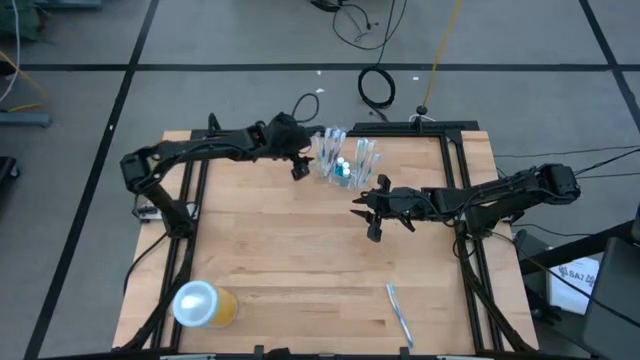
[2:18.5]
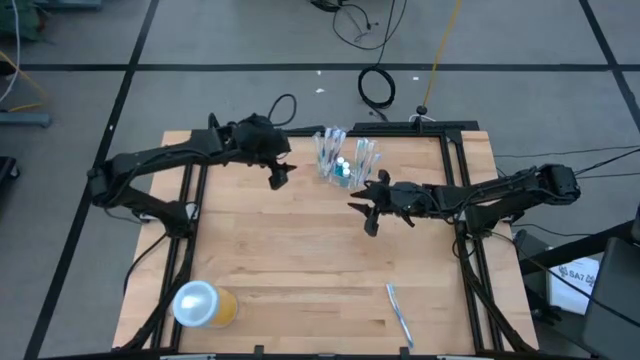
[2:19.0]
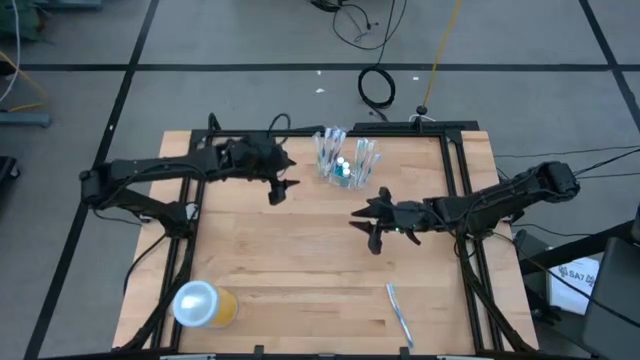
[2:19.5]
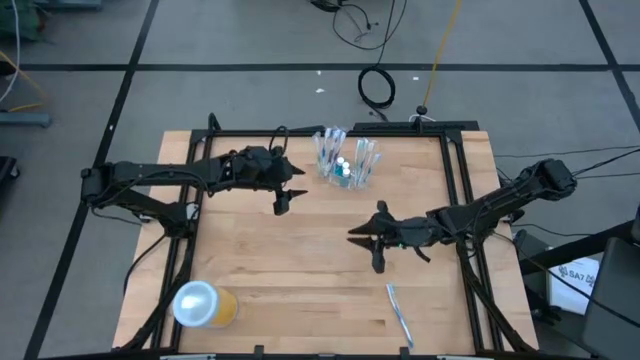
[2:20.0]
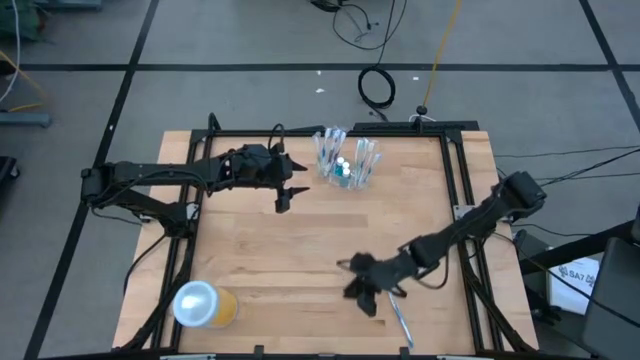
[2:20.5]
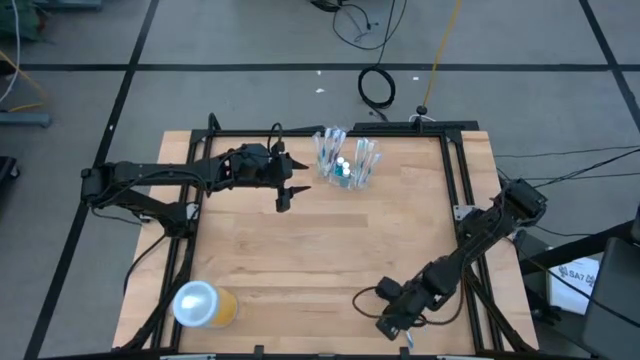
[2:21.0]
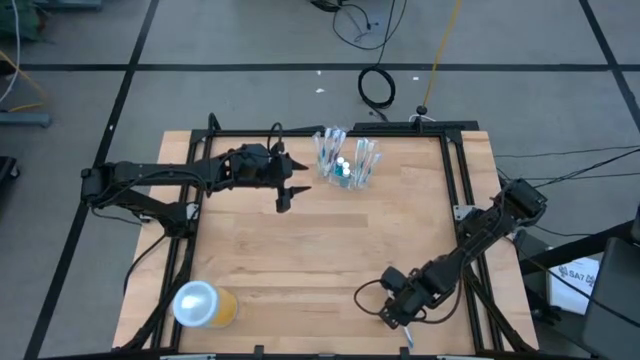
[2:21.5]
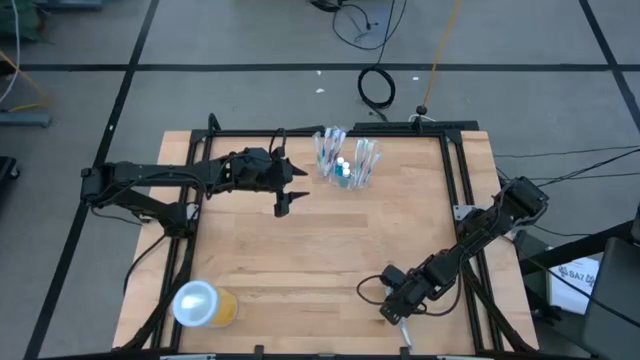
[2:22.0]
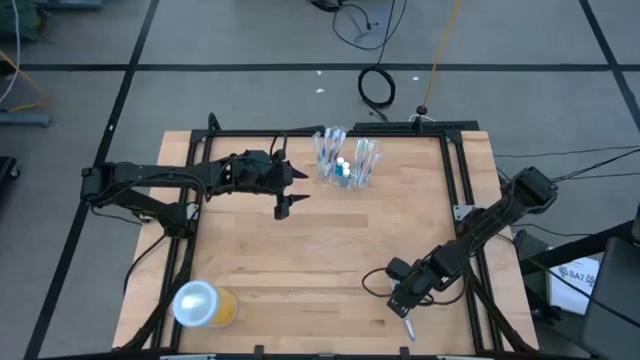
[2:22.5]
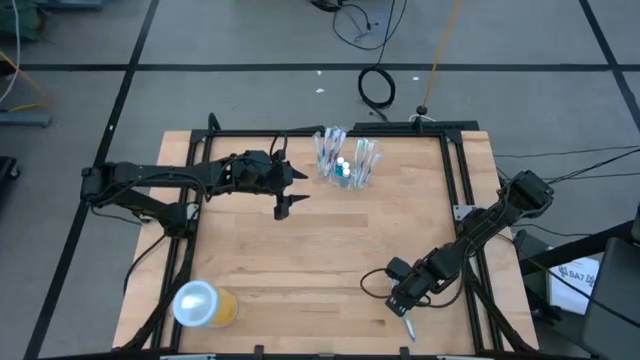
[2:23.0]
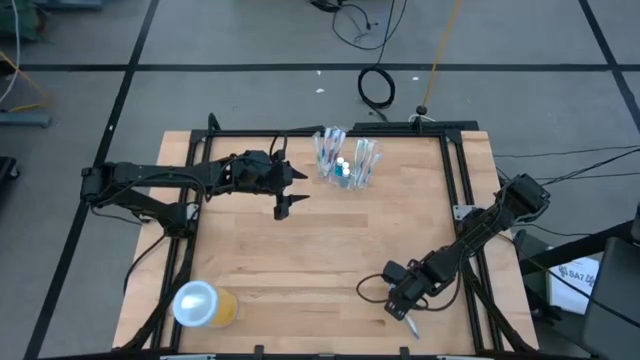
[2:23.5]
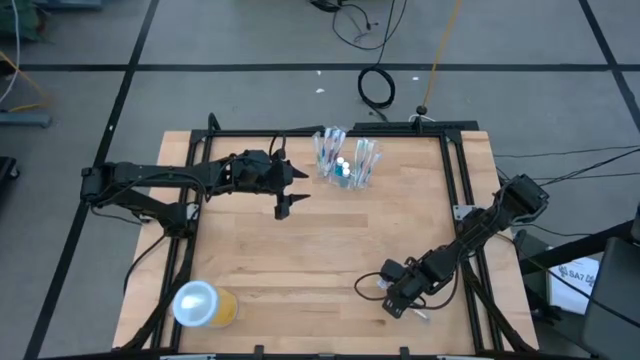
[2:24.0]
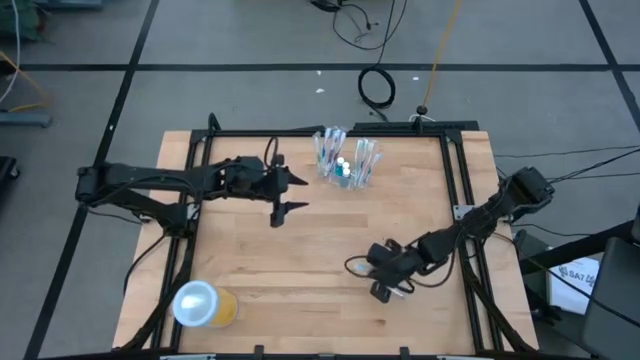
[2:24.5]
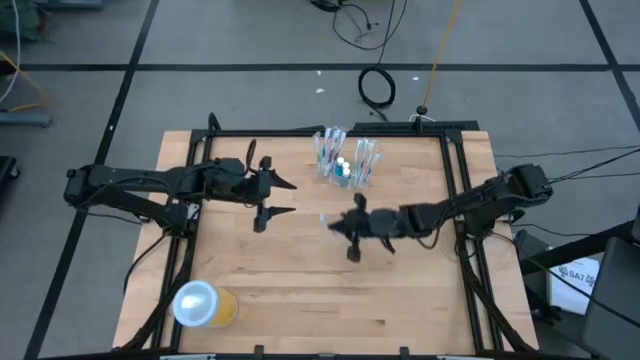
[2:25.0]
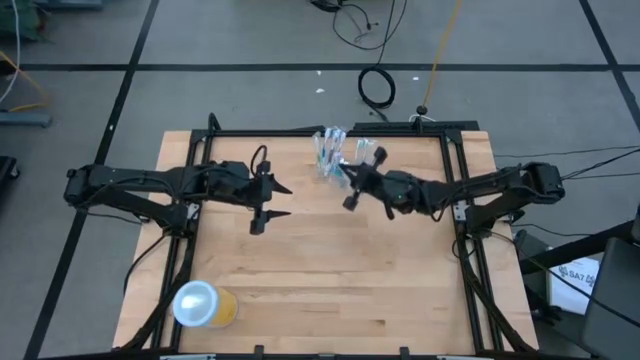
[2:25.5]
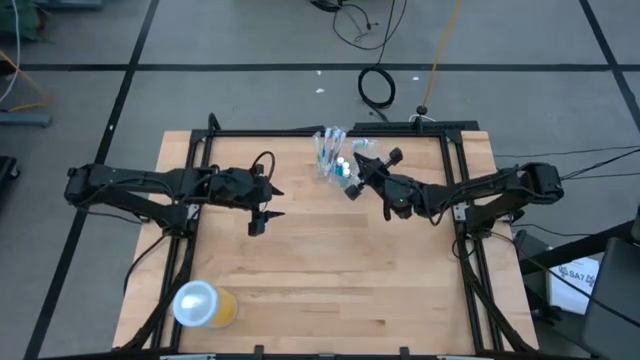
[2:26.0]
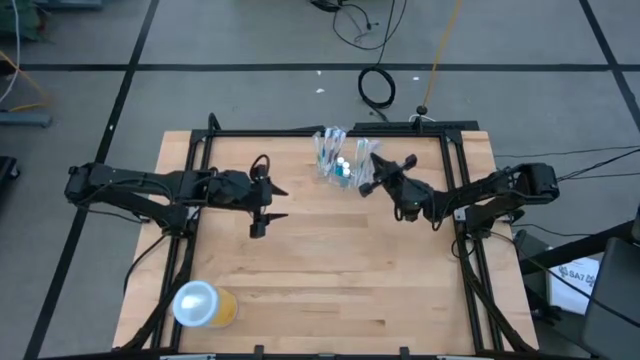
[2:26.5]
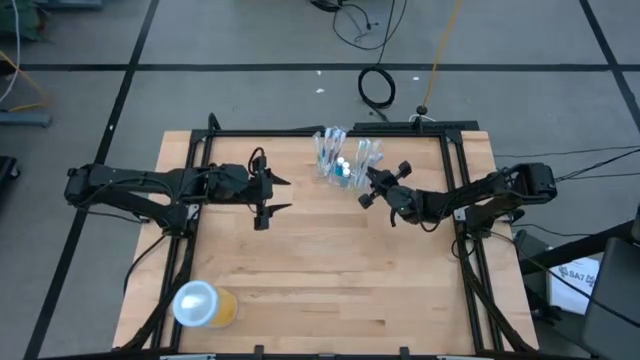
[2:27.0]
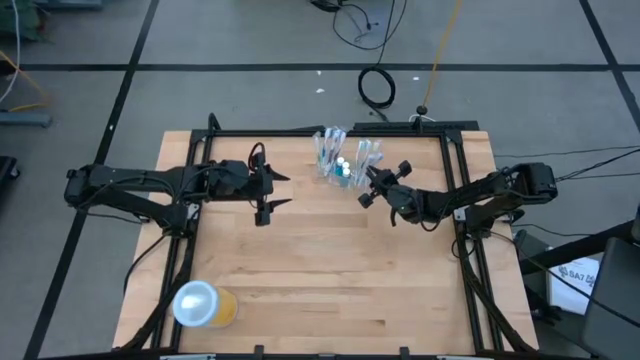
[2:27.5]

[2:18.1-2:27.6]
Task: Pick & Place toothbrushing station
Put the blue toothbrush into the transparent organizer

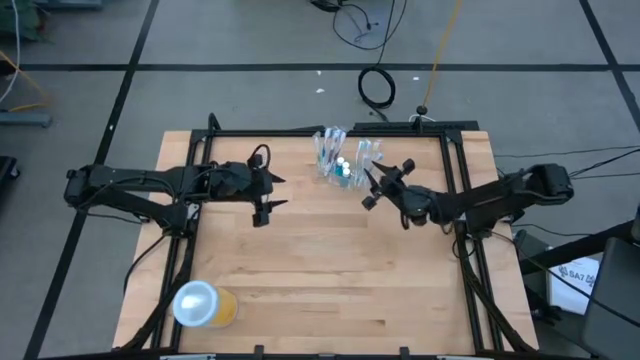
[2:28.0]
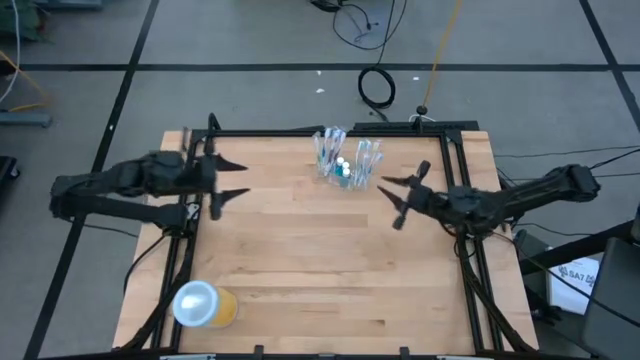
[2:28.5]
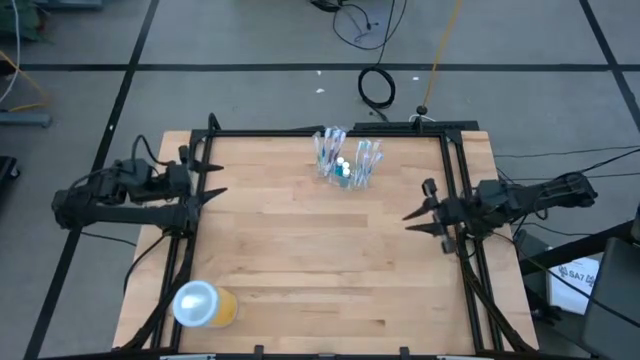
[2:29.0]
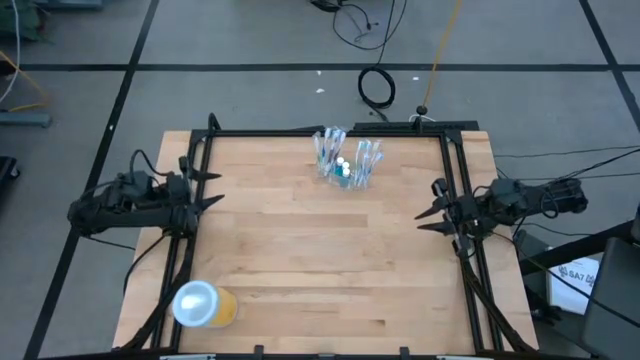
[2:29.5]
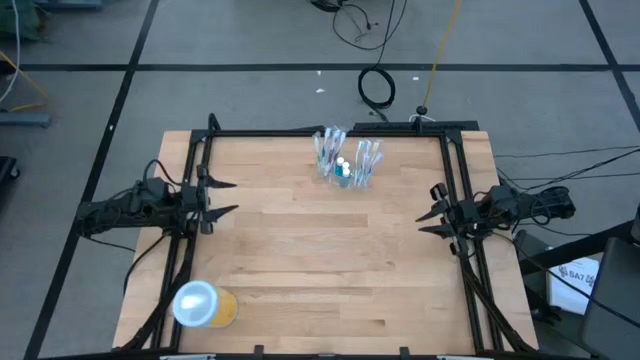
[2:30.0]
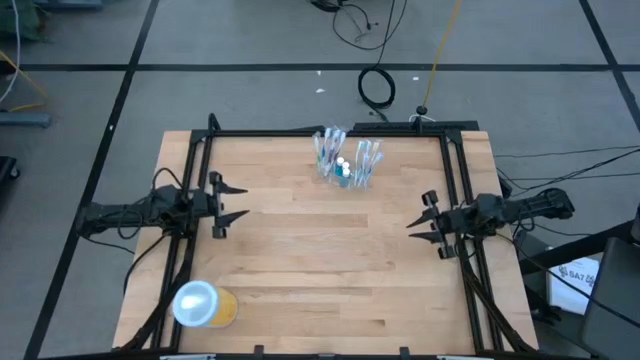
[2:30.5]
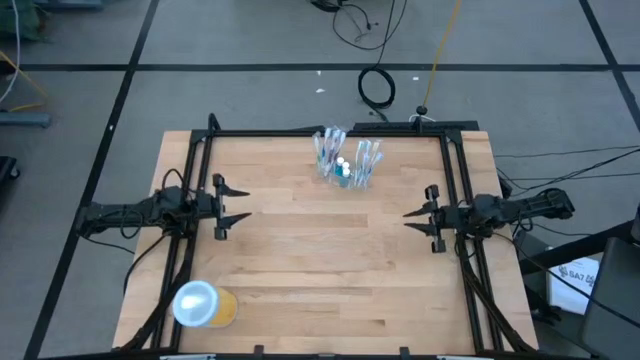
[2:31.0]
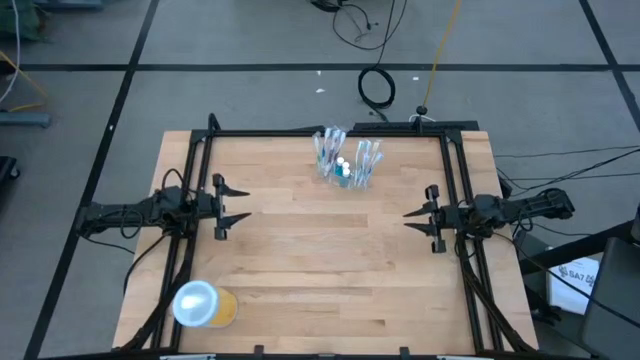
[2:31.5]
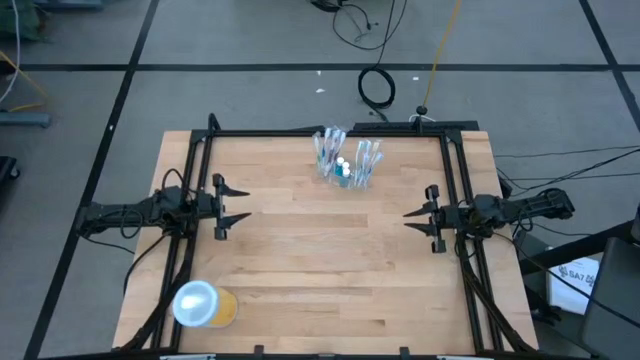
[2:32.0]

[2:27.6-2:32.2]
Return to Home Position
